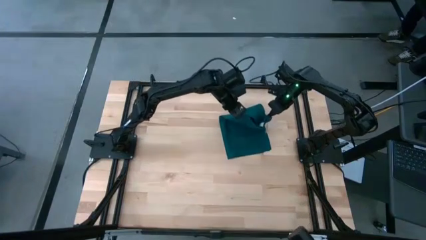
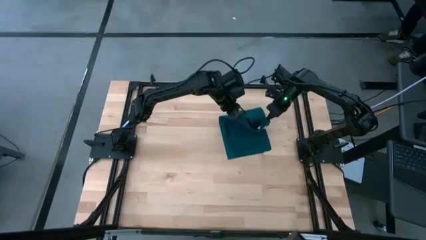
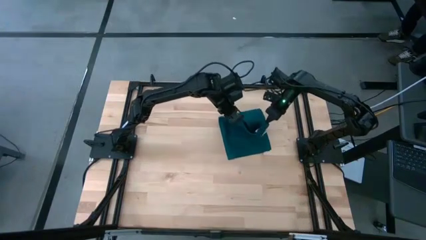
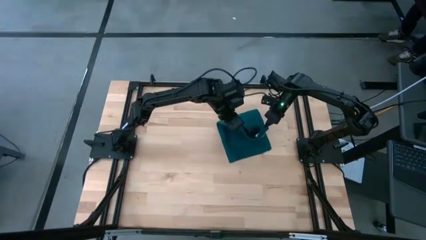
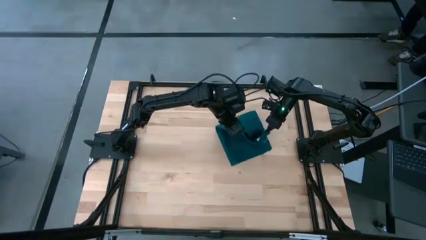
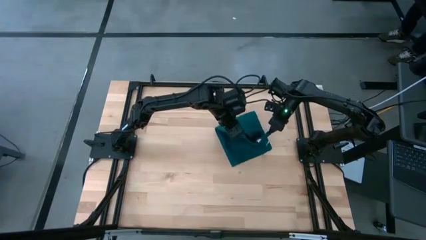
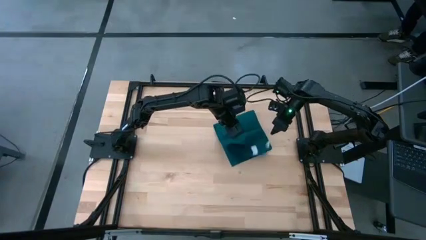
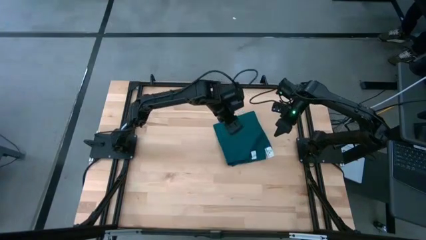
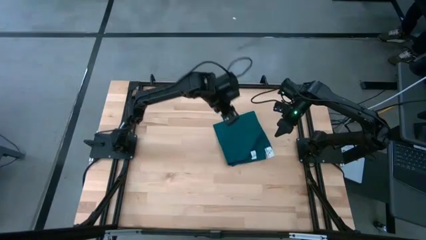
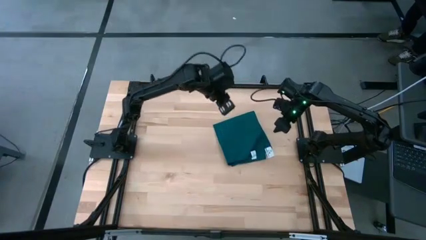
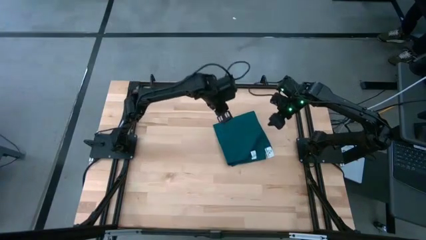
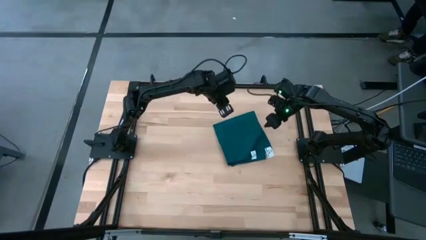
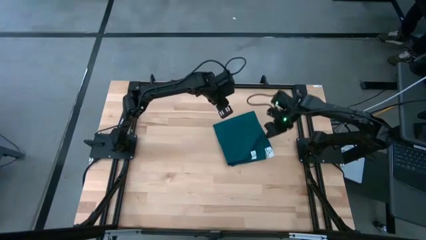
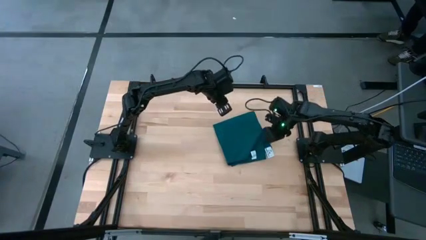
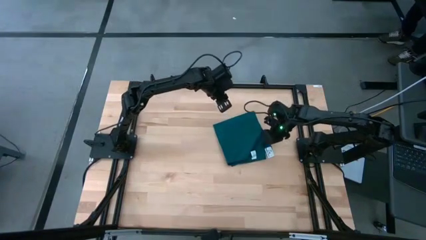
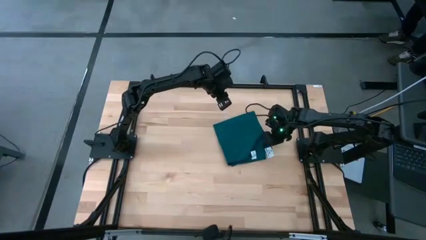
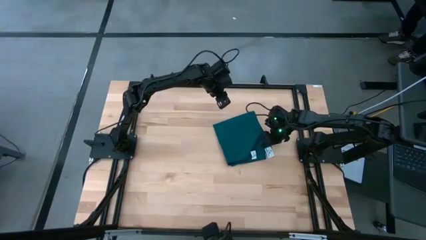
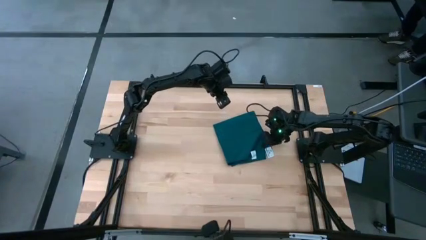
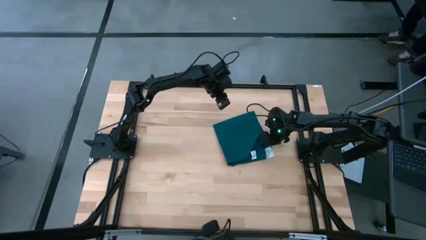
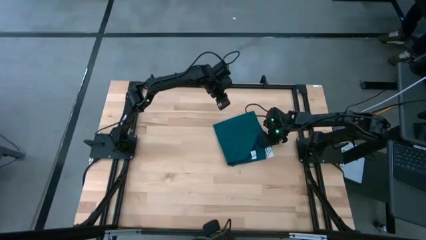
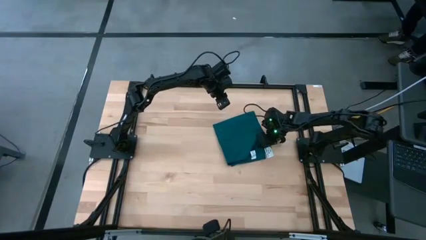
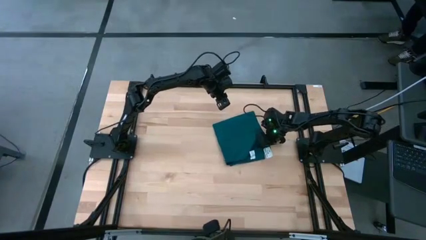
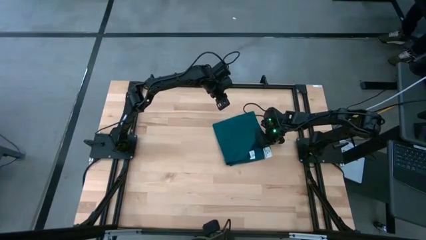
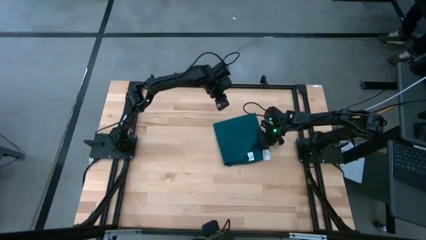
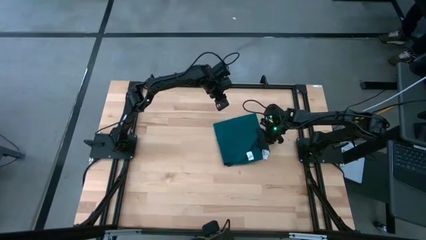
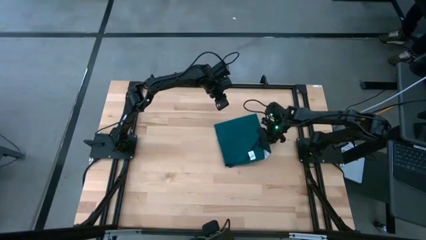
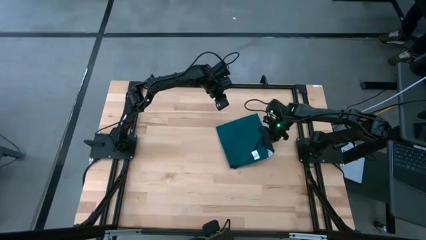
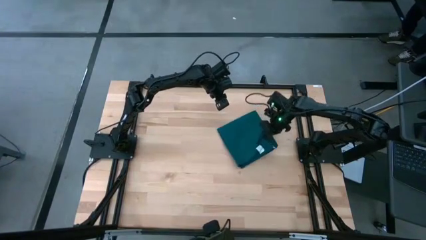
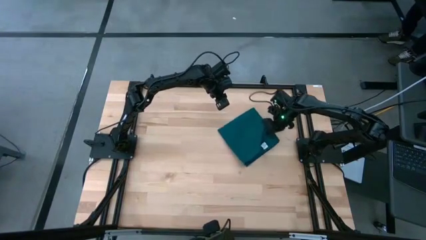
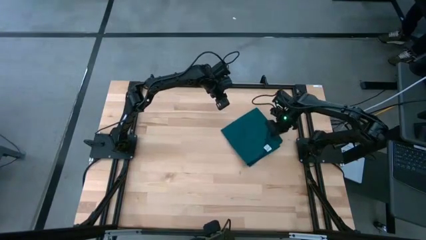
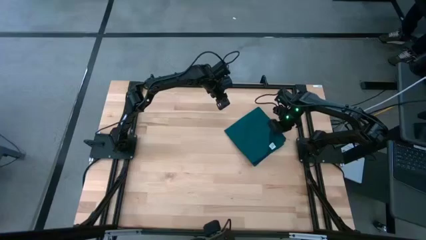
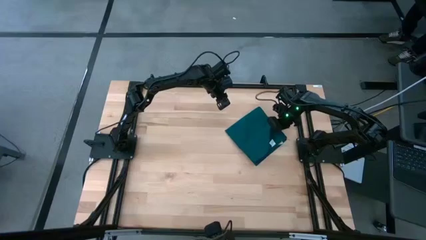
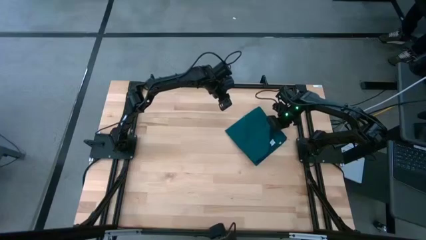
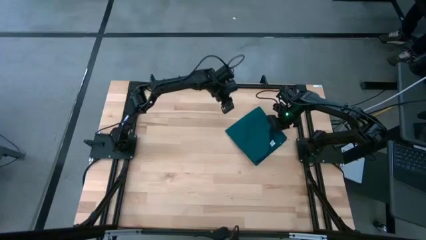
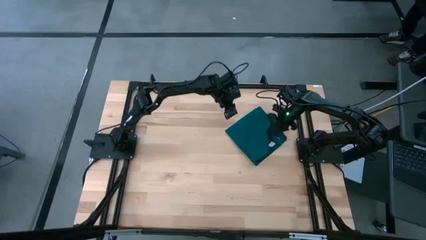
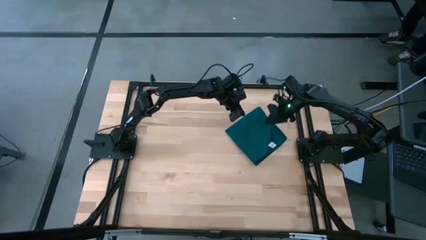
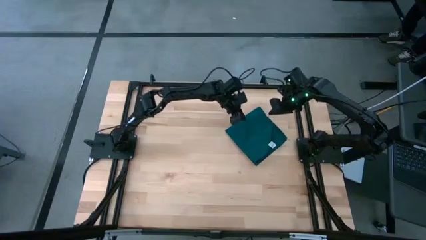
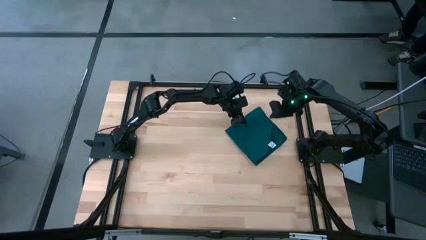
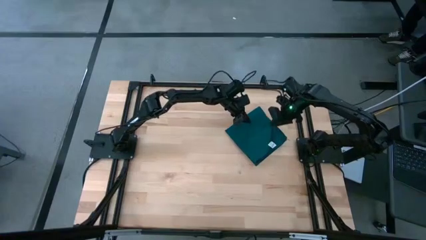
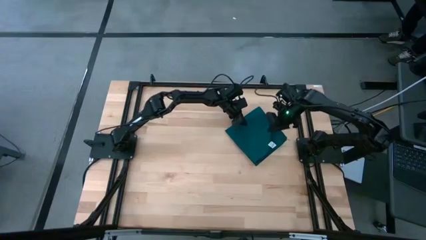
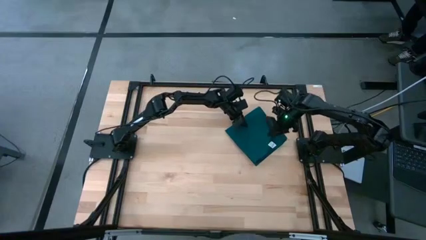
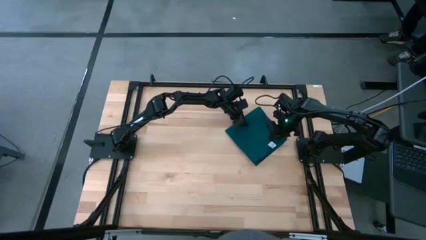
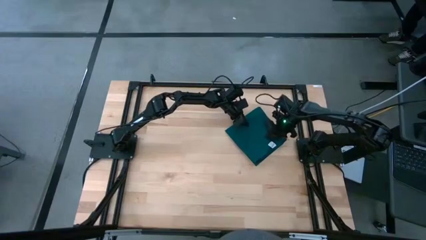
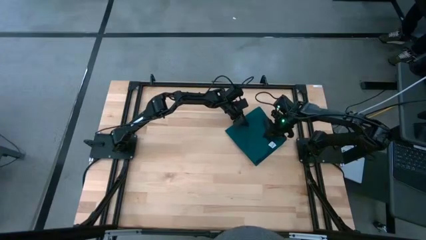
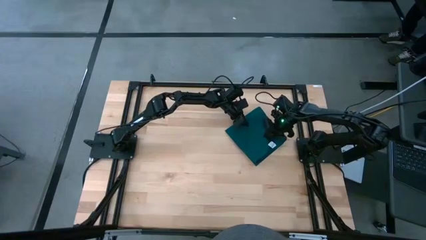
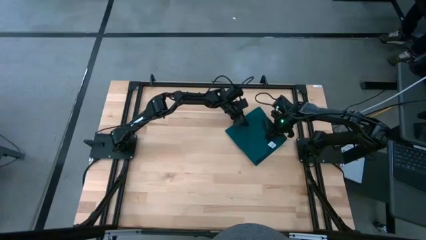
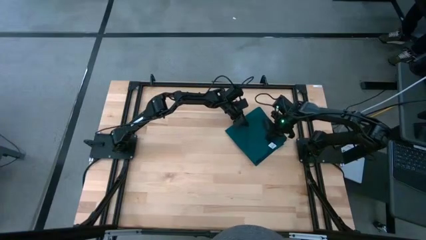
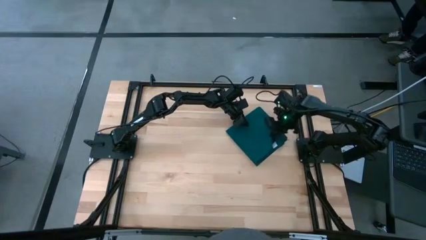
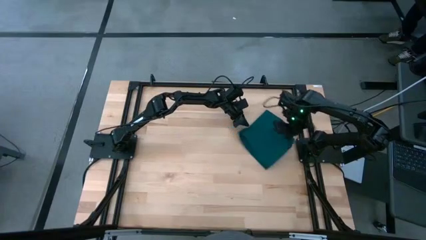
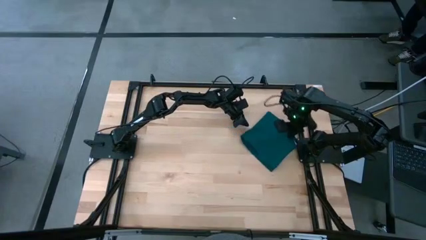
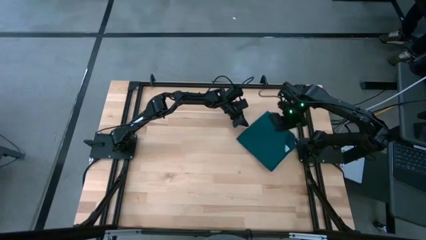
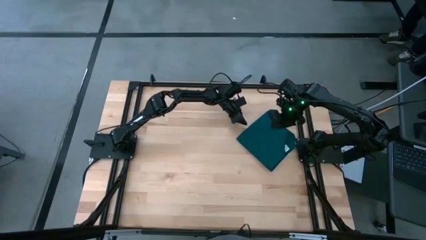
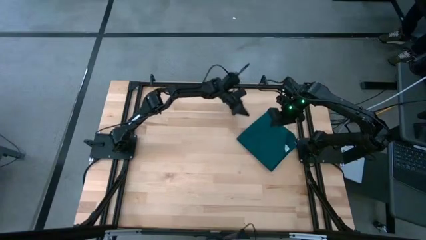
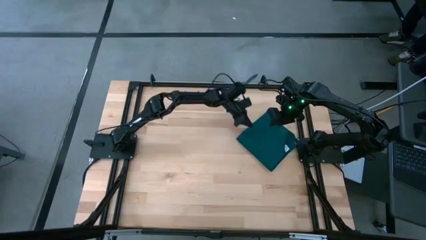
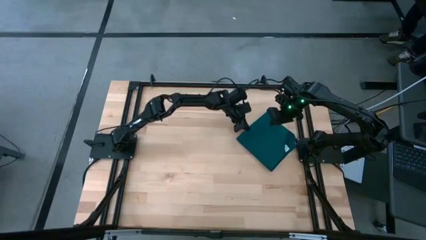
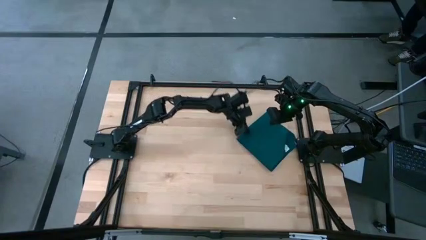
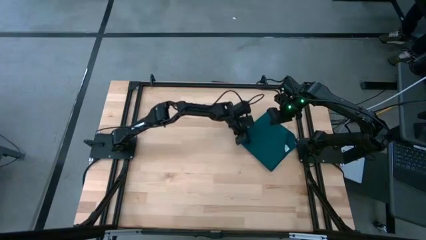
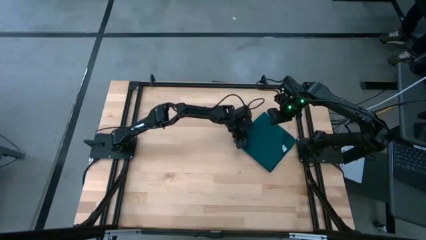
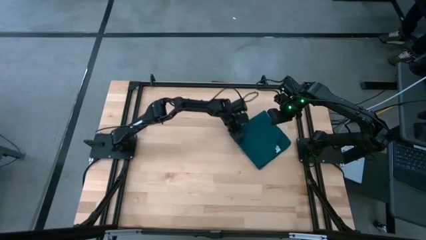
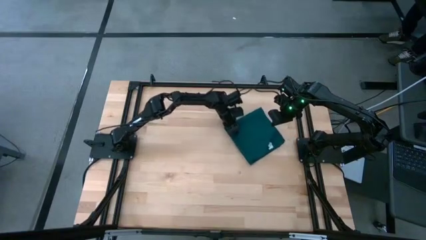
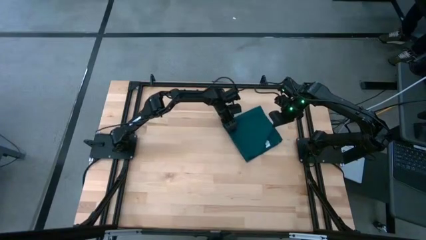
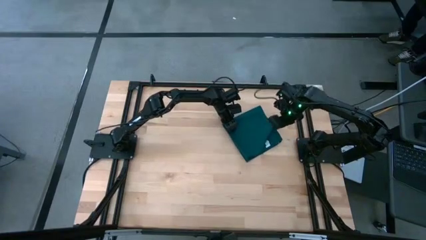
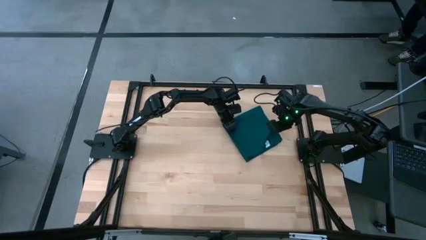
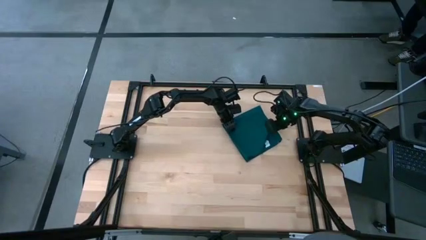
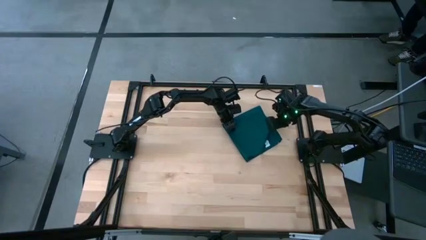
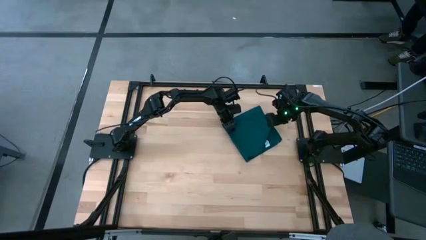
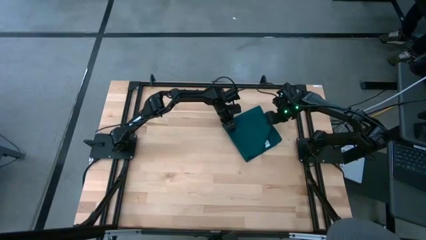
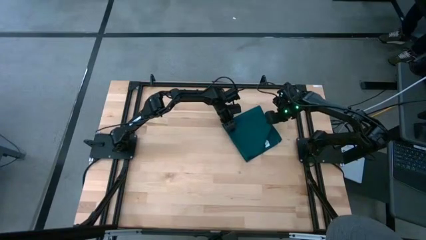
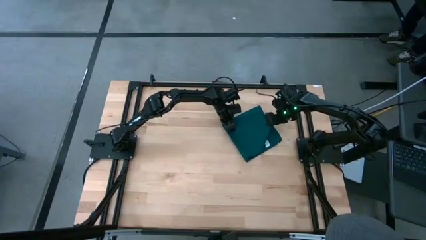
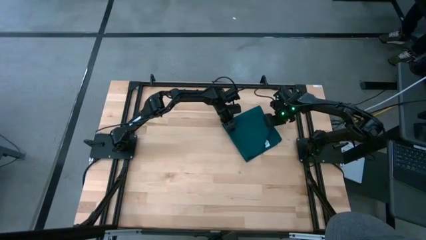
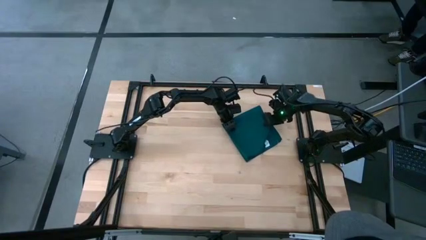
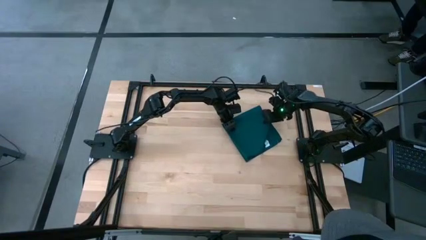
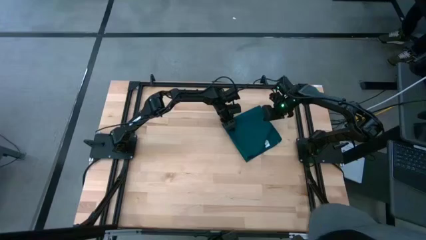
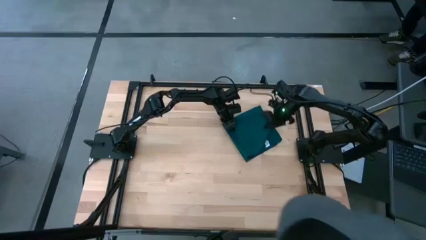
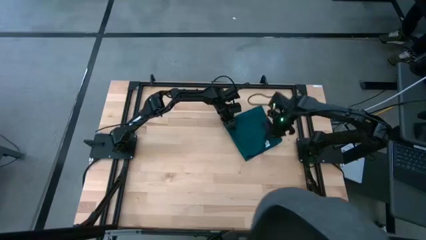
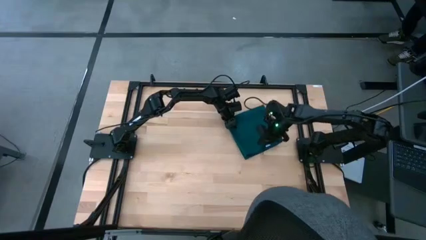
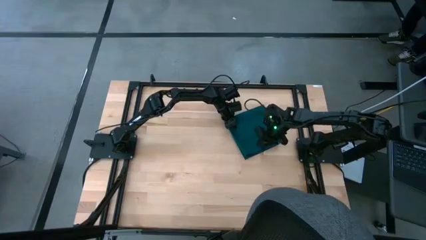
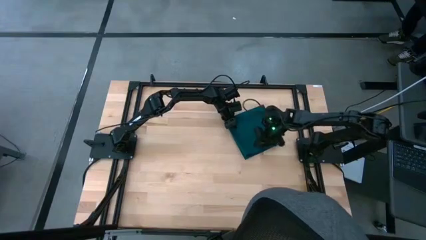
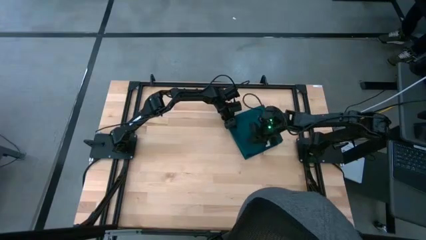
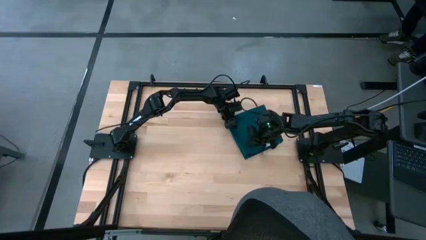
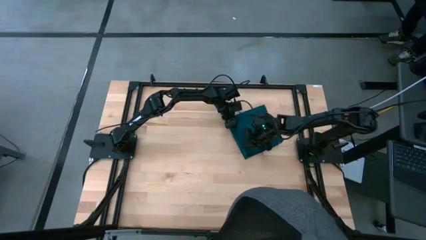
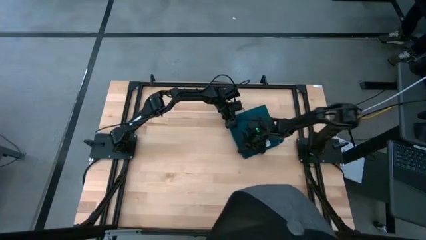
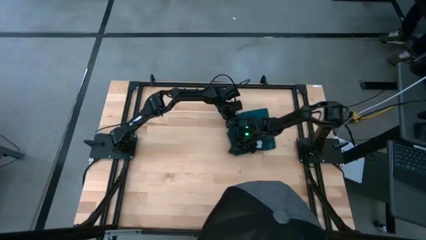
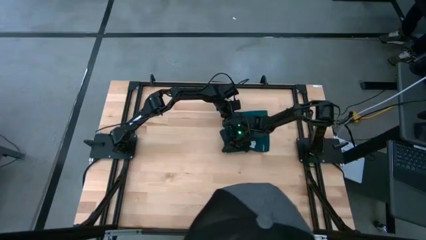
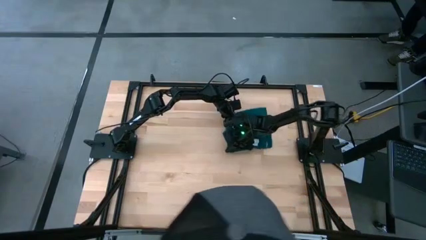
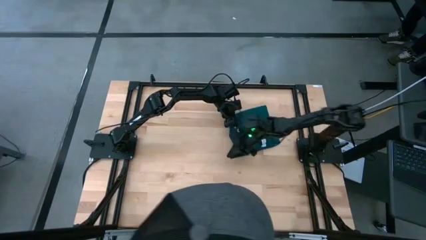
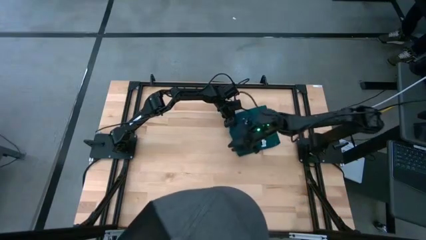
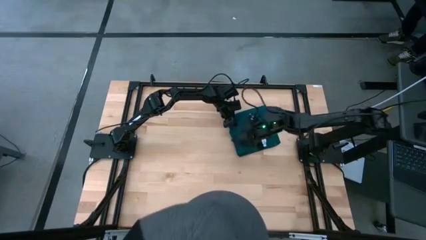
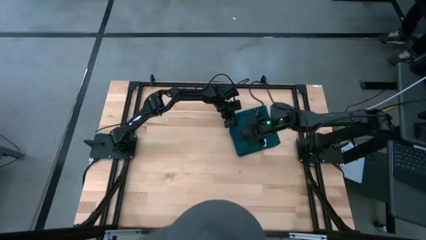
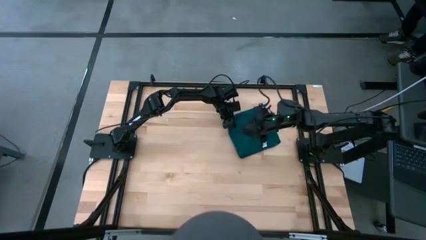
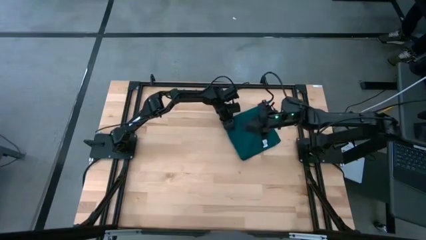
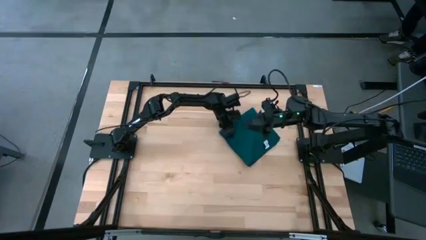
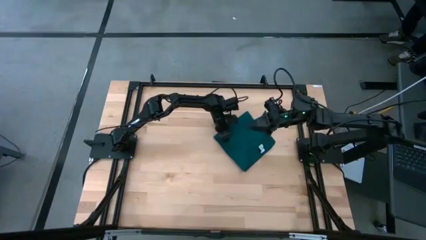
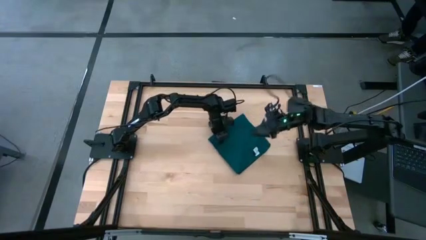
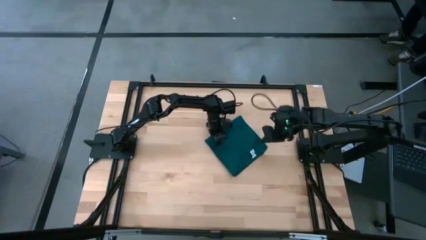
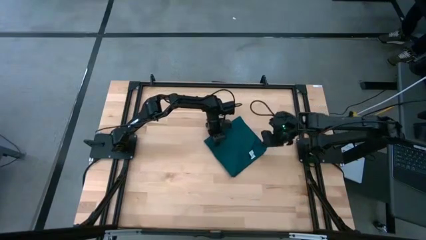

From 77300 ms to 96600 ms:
Task: Fold microfiber towels
Fold the black towel on the table
